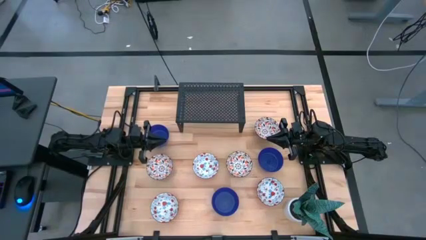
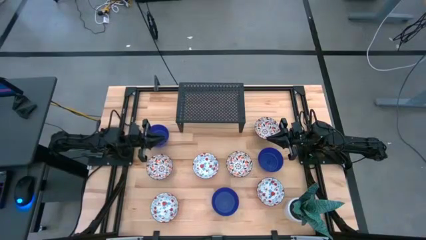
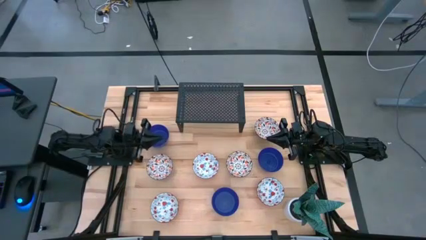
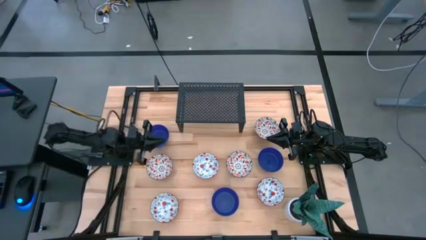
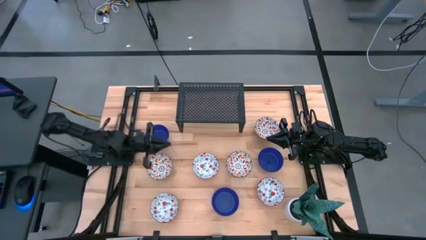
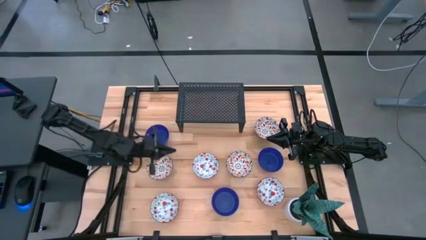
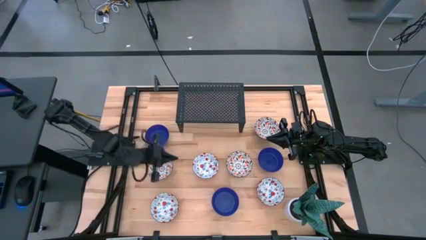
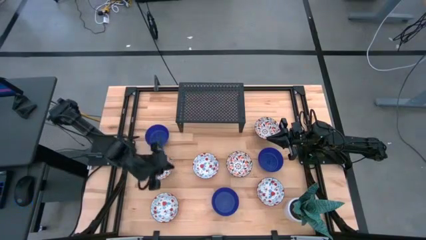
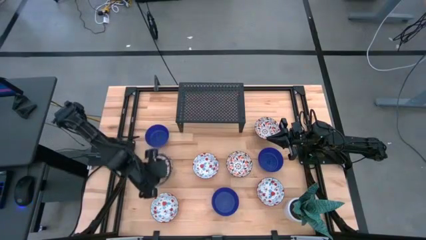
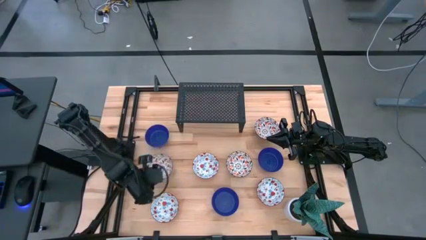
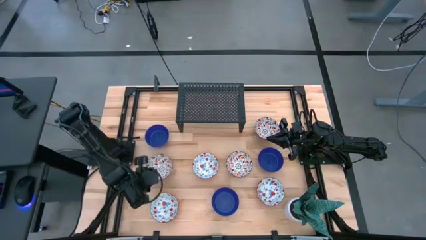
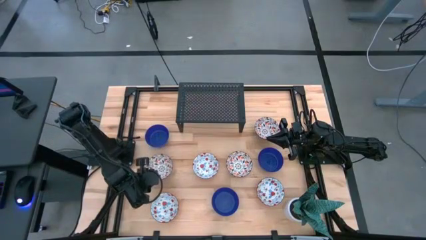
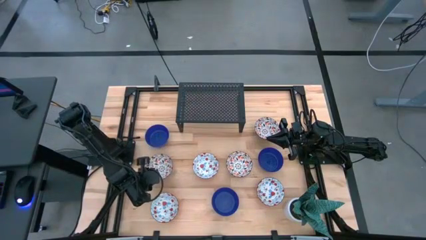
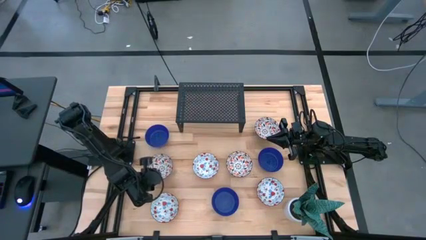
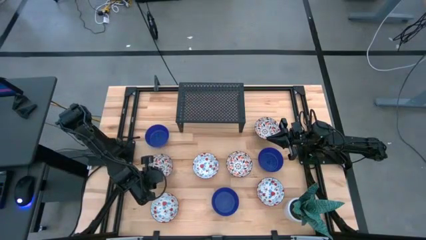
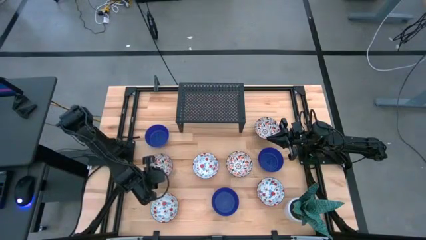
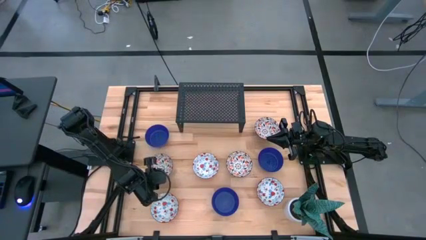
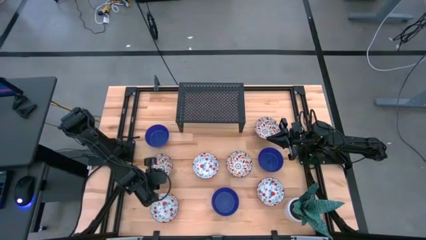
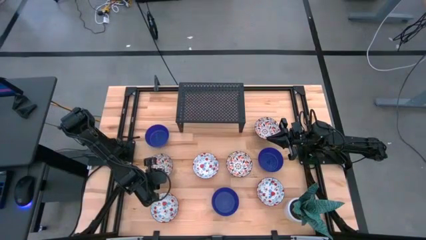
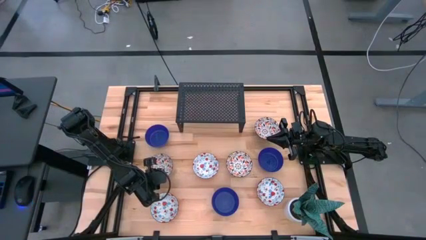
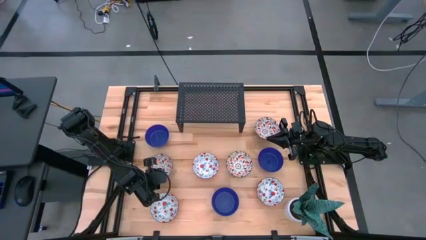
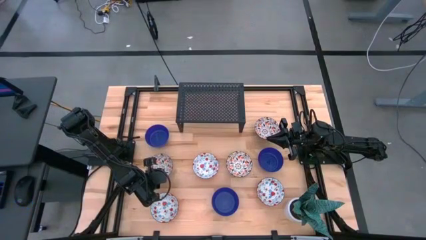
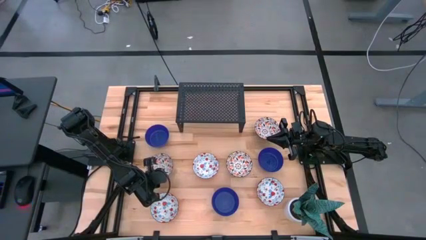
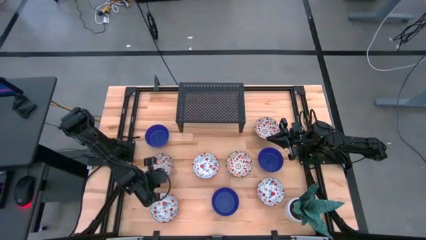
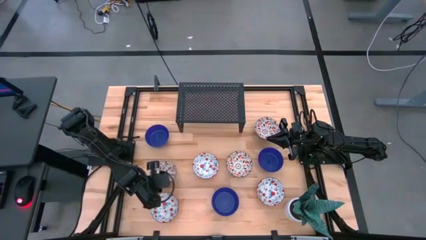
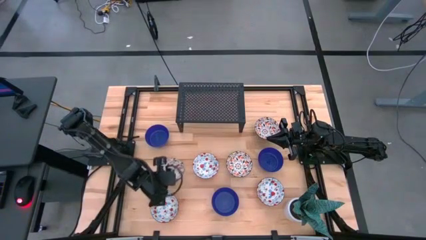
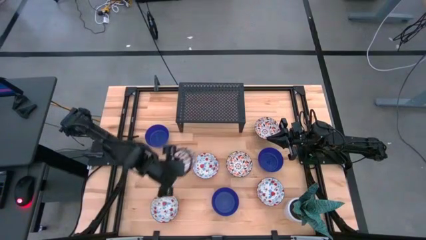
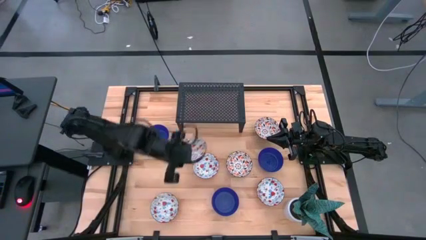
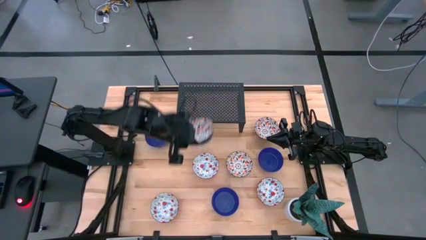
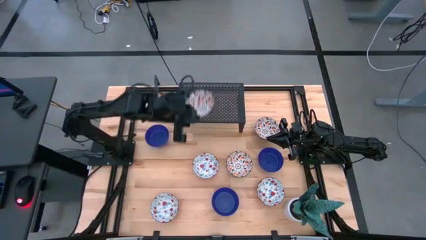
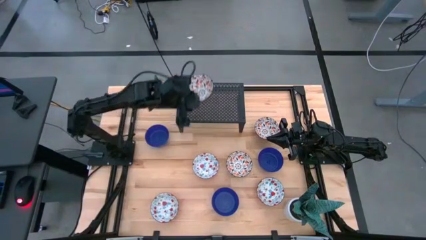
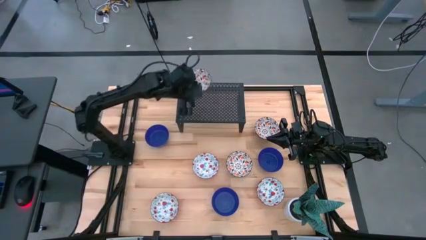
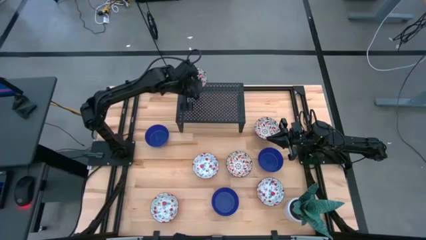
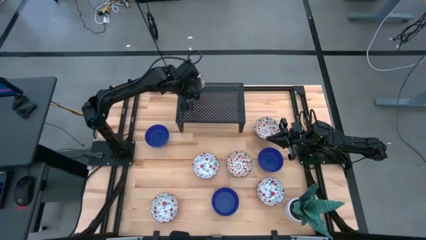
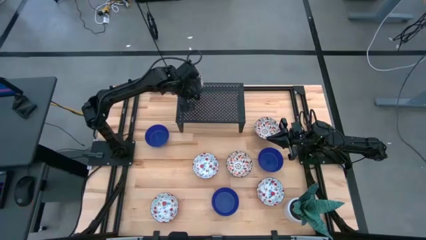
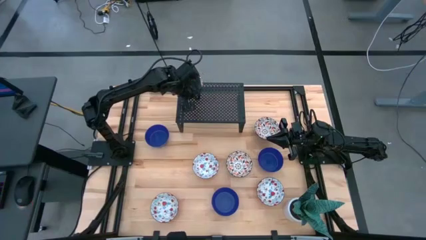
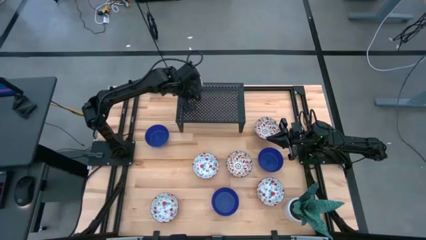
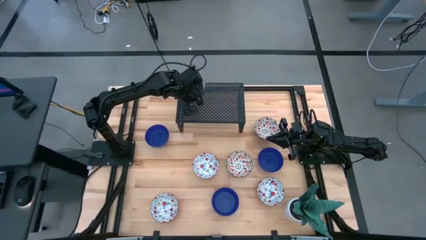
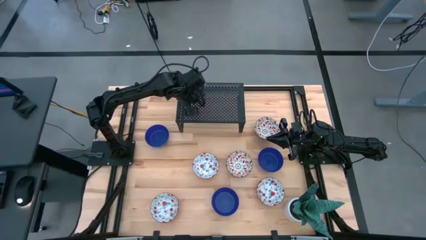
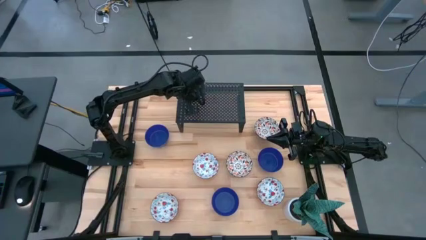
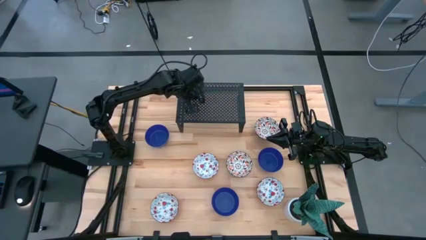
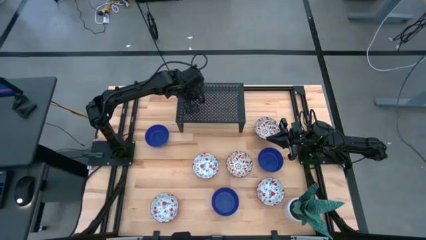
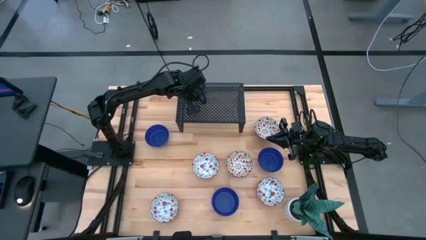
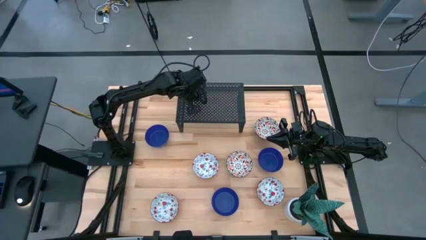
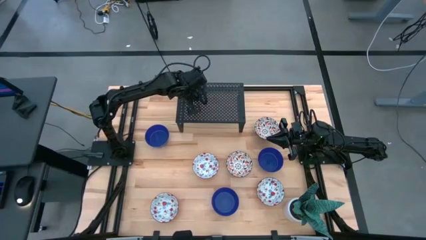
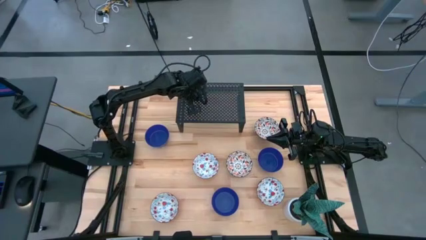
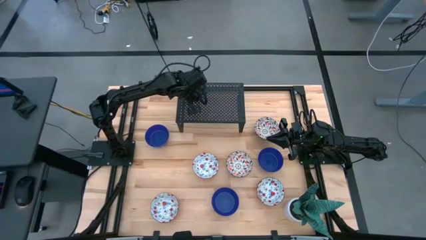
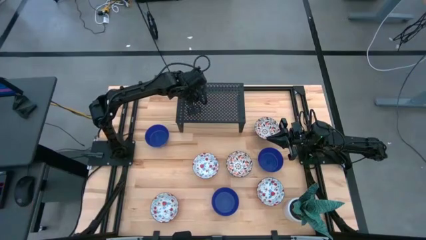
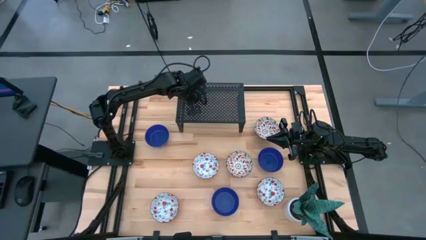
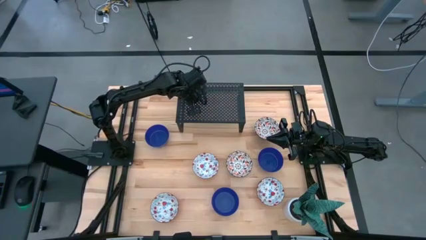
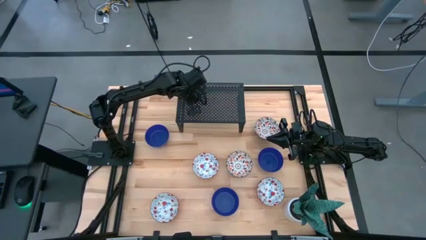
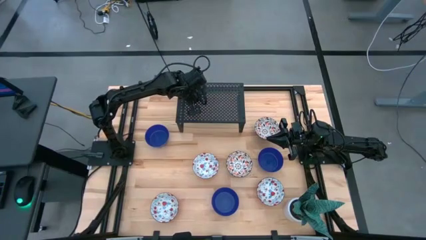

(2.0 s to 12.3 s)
Task: Pick & Place Mini bowls
Put the left black bowl on the shelf

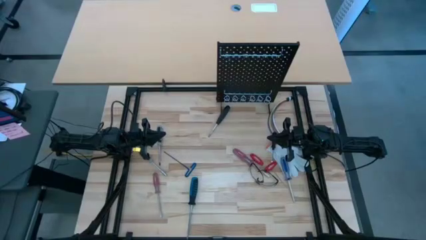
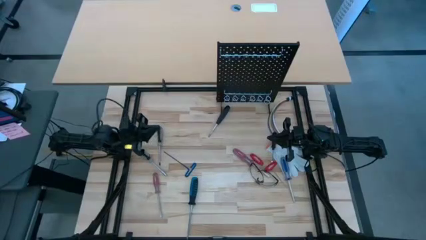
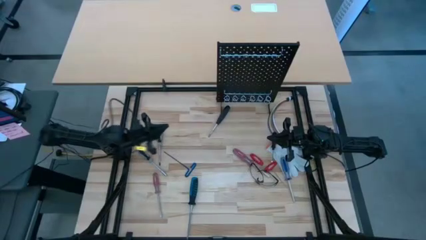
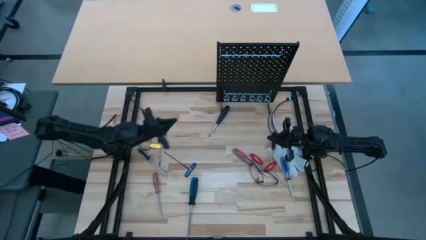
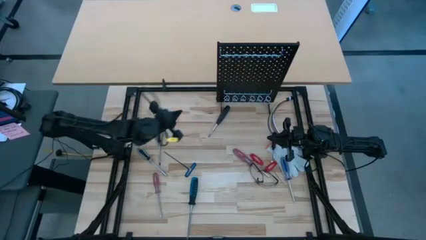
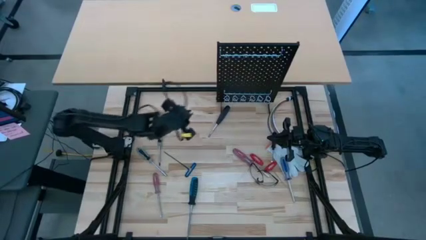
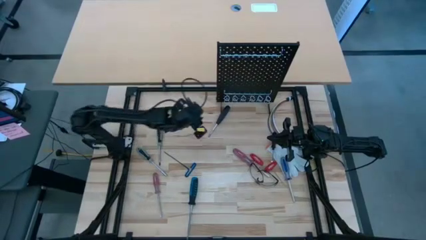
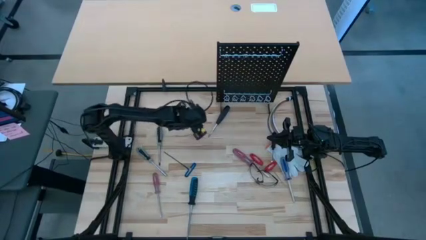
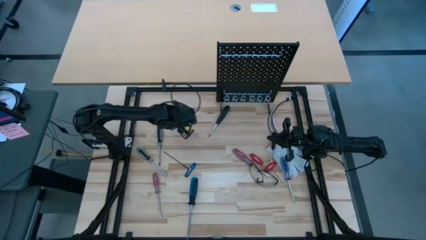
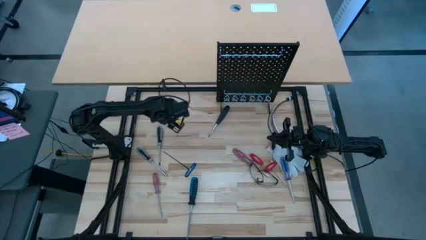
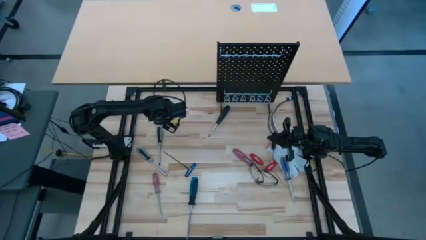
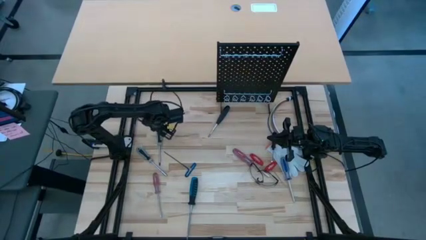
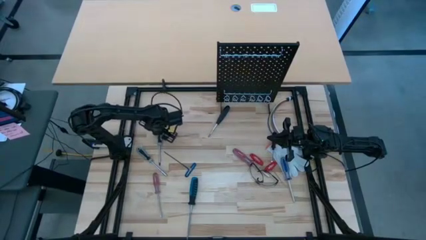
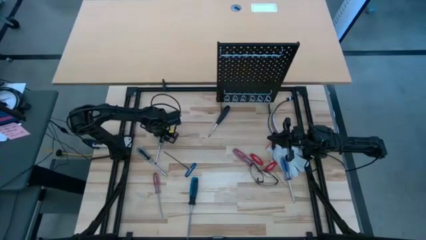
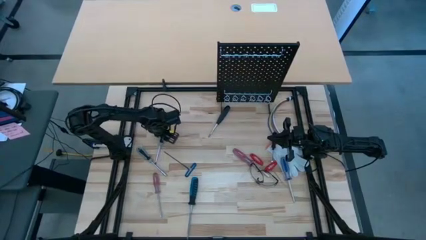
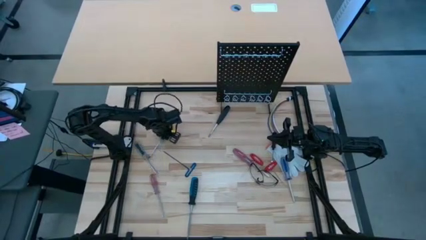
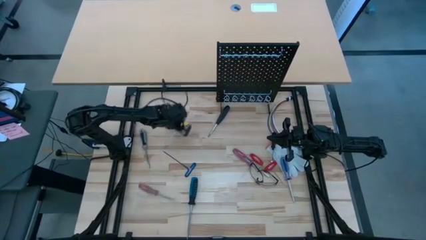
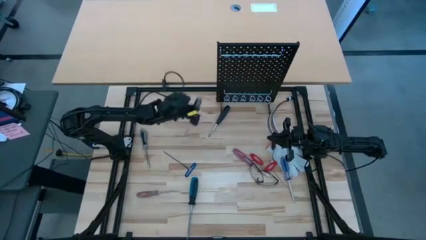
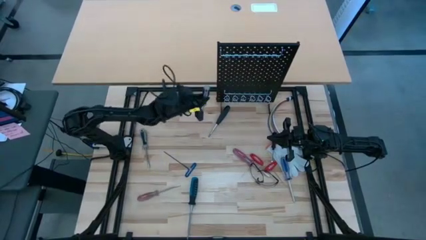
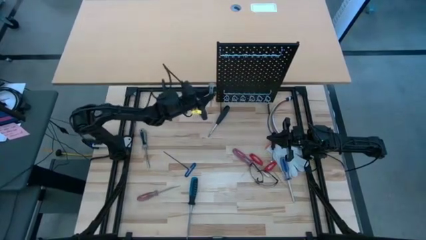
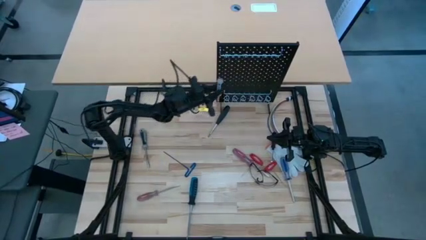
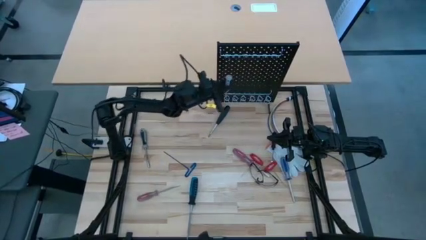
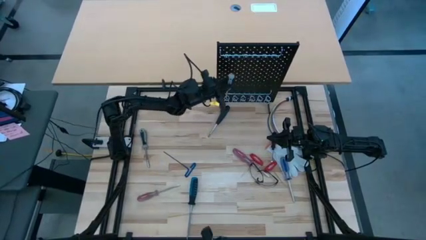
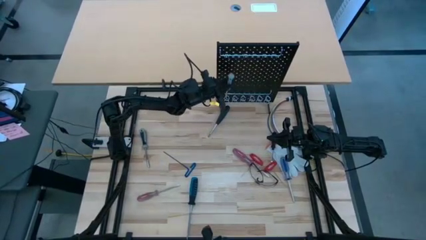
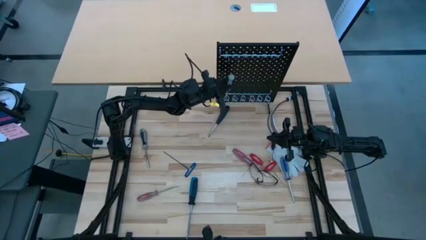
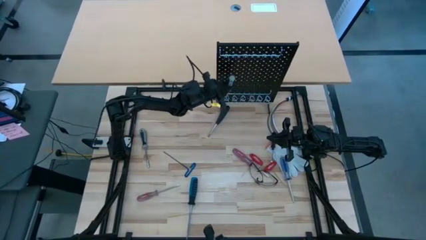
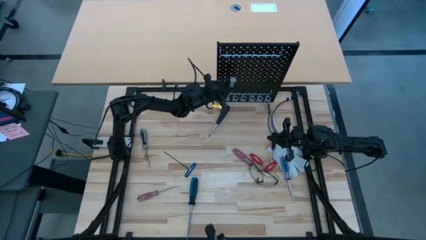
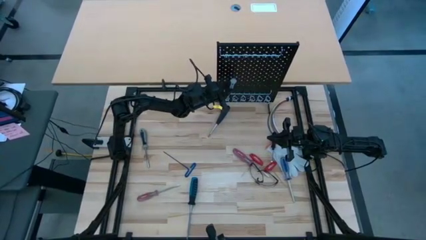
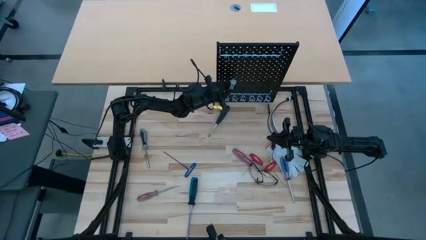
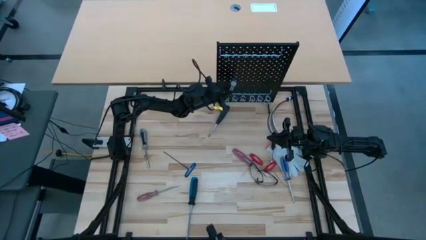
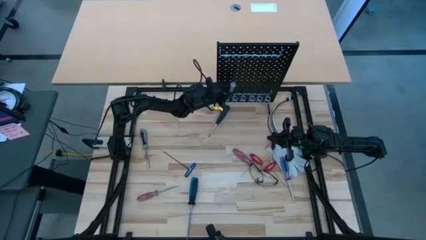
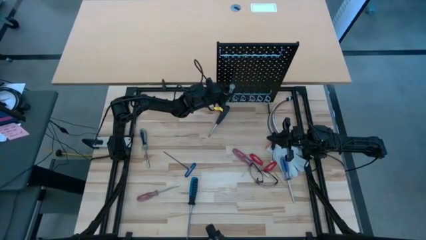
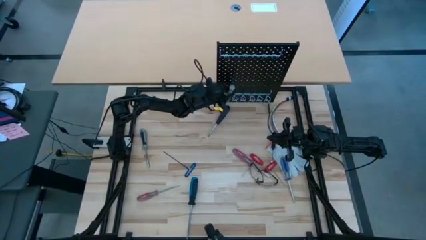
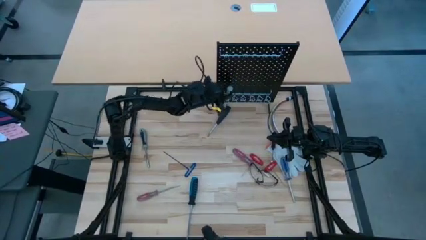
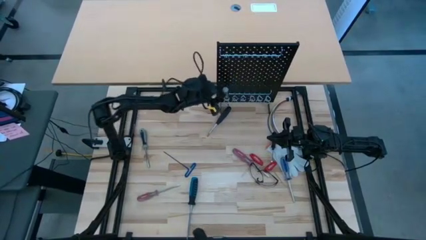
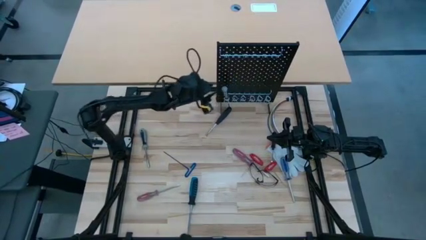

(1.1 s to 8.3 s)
Task: Hang tools onto peg board
Hang the top gray screwdriver on the pegboard
